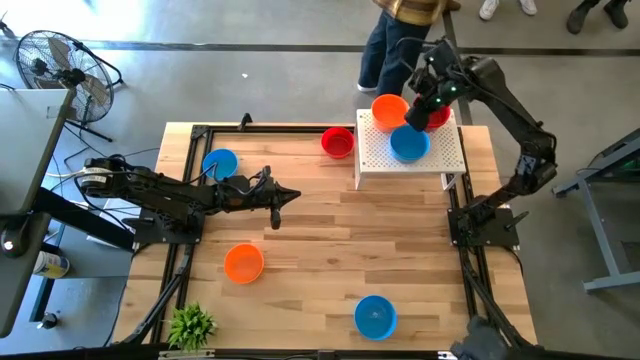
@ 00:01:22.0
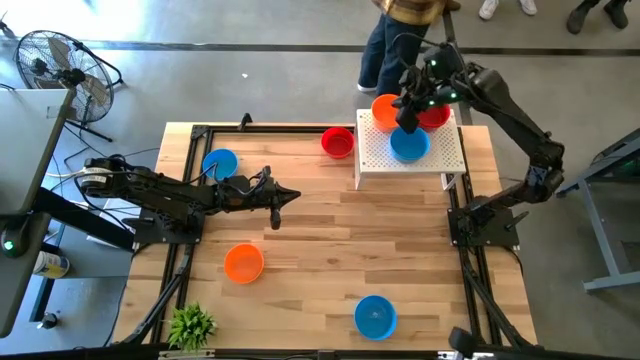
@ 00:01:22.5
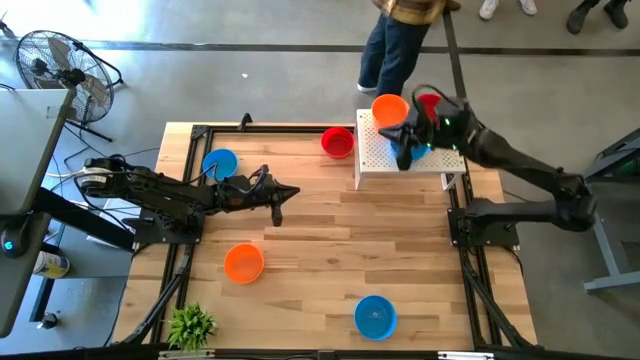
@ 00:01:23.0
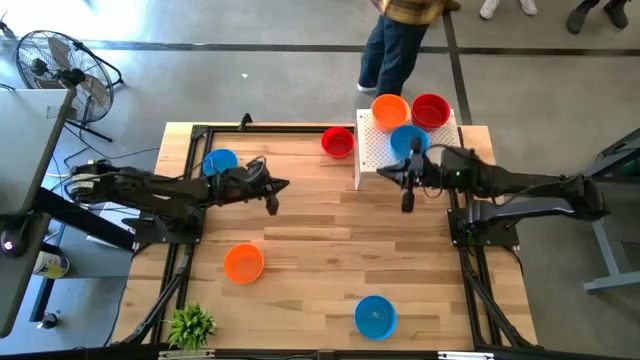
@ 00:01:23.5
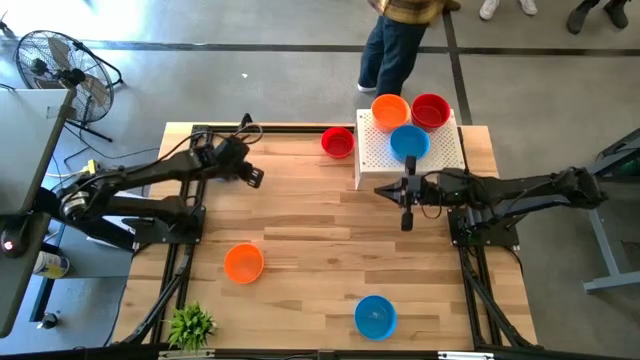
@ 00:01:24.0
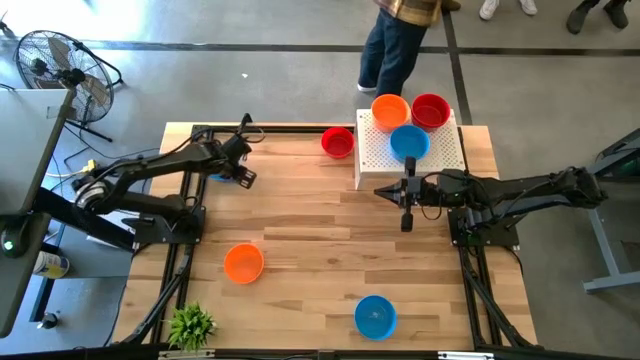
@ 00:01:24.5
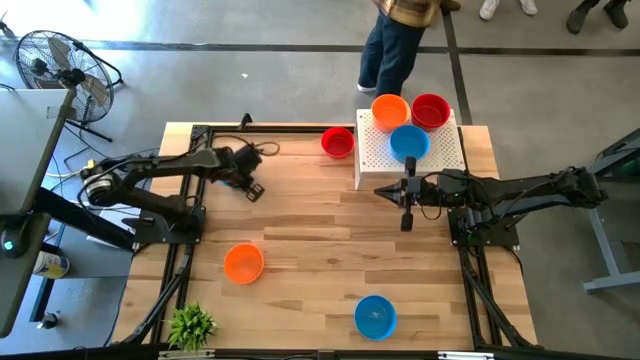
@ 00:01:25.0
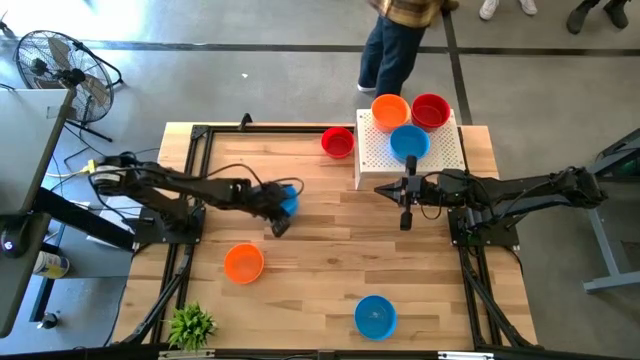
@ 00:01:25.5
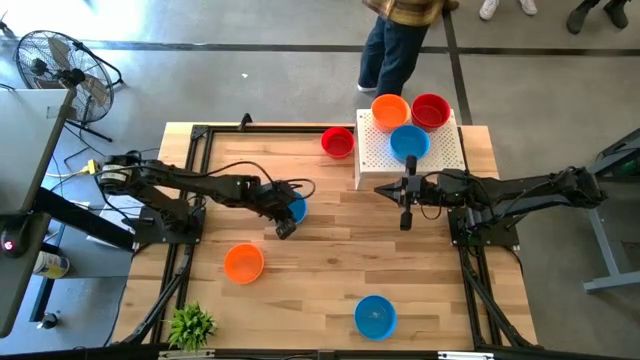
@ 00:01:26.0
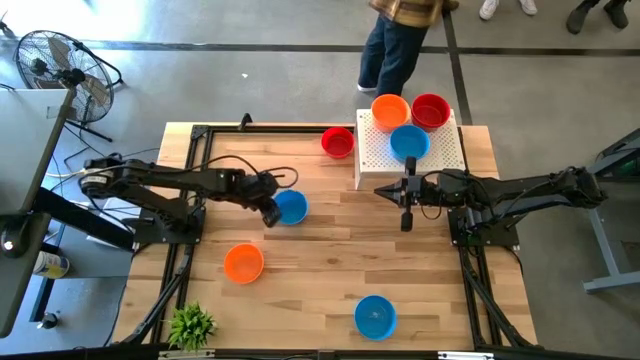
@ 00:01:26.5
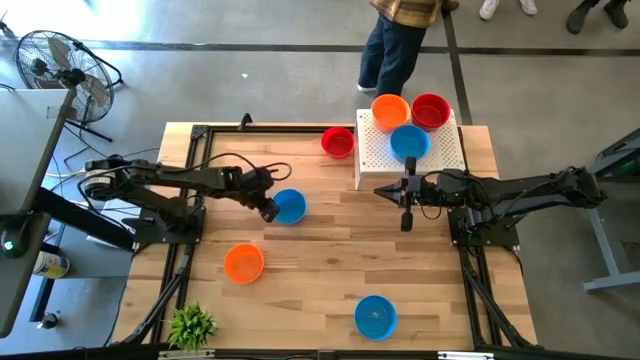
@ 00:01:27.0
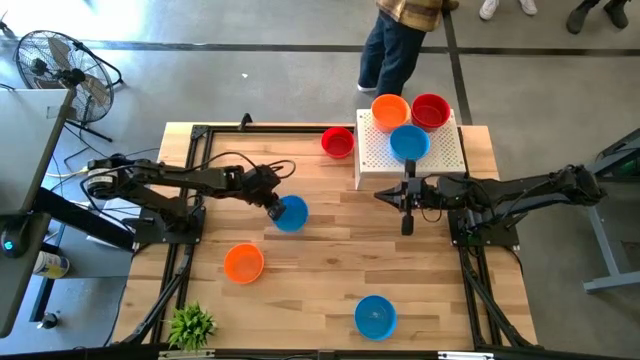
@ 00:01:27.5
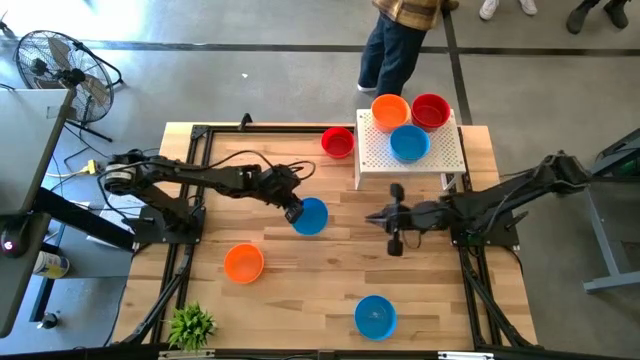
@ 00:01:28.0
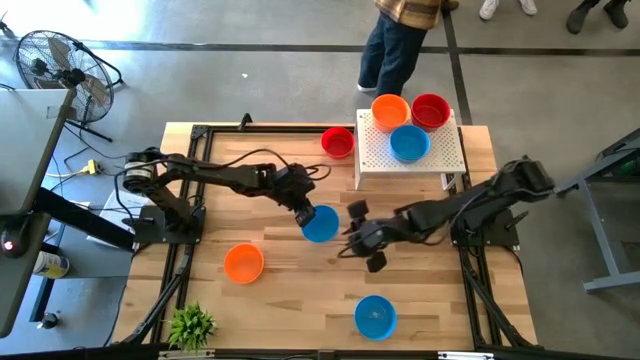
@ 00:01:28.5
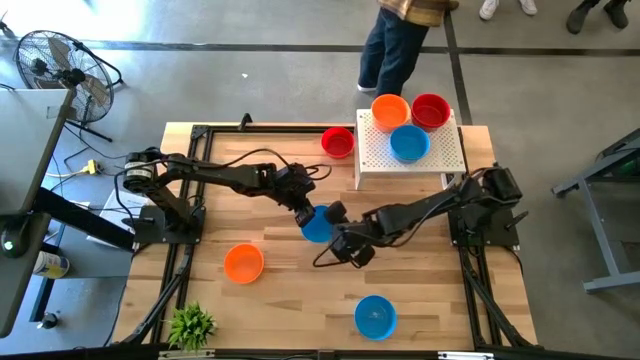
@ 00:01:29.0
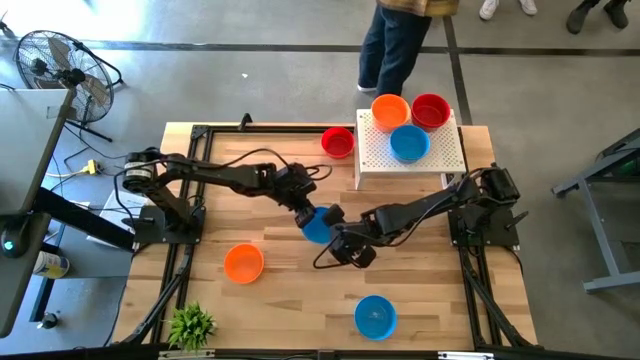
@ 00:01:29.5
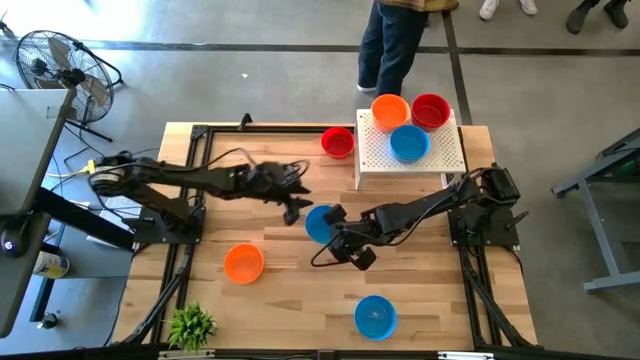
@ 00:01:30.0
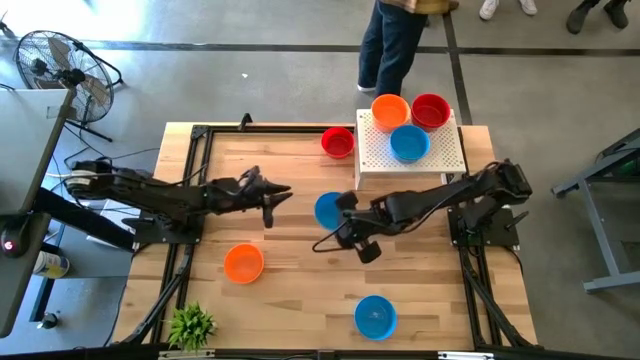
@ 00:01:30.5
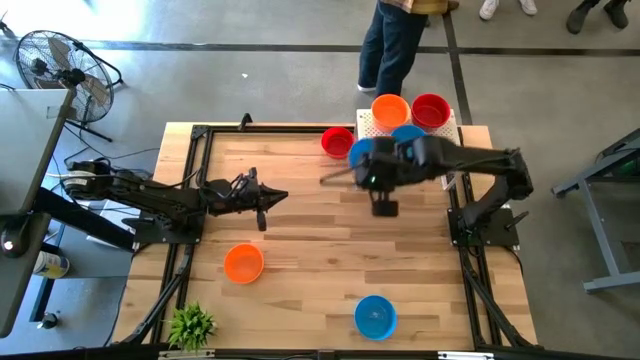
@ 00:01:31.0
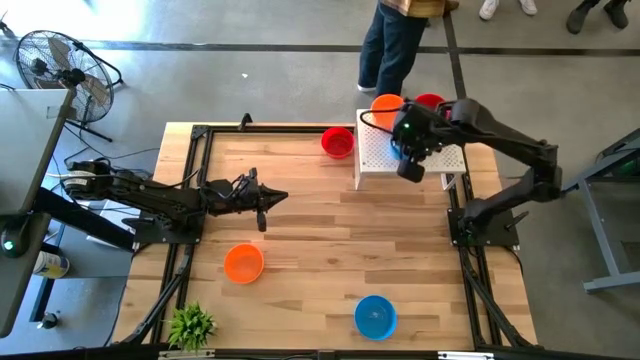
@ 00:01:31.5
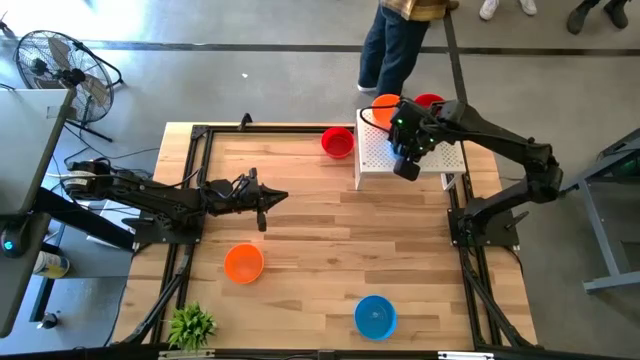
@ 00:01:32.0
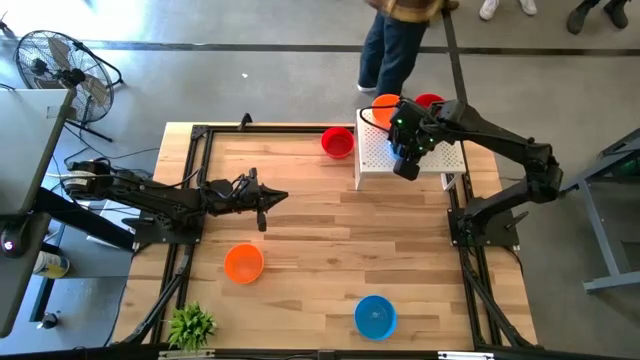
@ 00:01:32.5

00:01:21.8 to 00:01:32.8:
Task: Pick & Place Mini bowls
Stack the blue bowl on the stacked blue bowls on the shelf

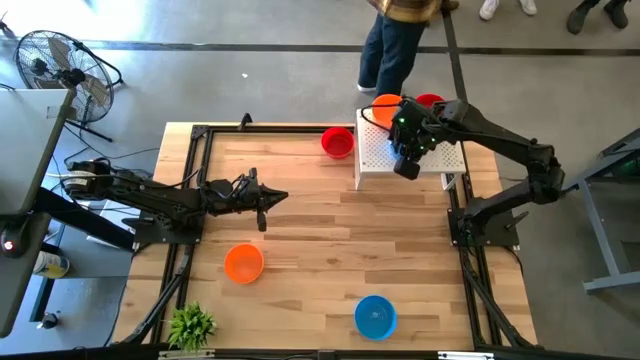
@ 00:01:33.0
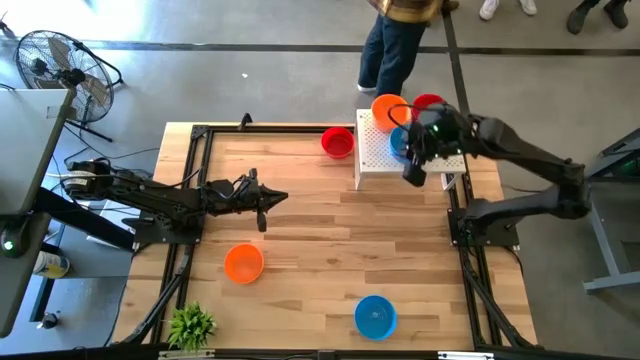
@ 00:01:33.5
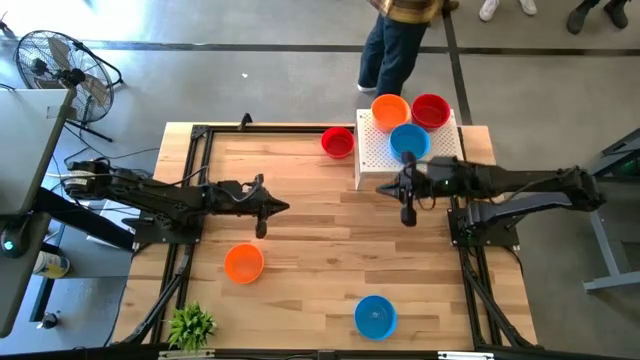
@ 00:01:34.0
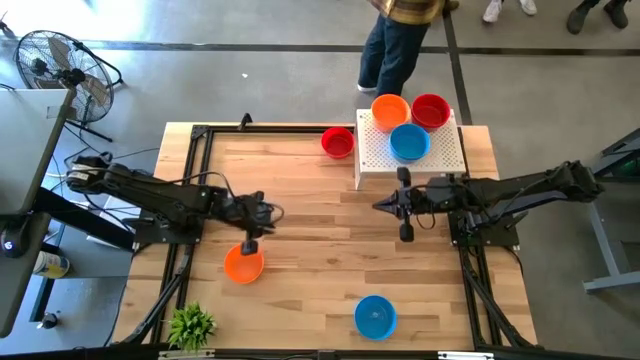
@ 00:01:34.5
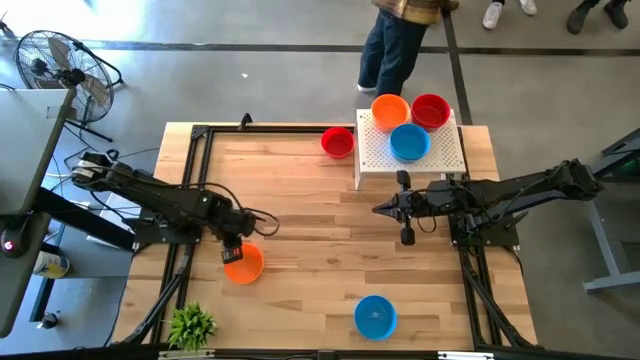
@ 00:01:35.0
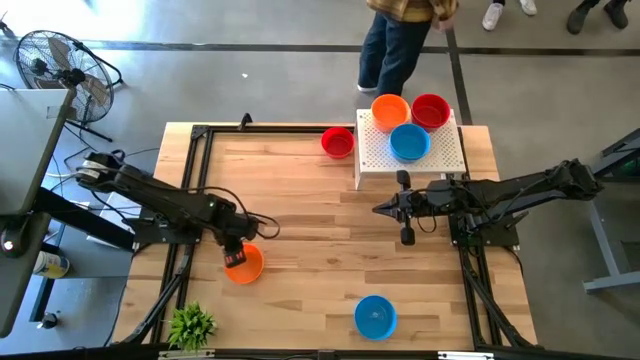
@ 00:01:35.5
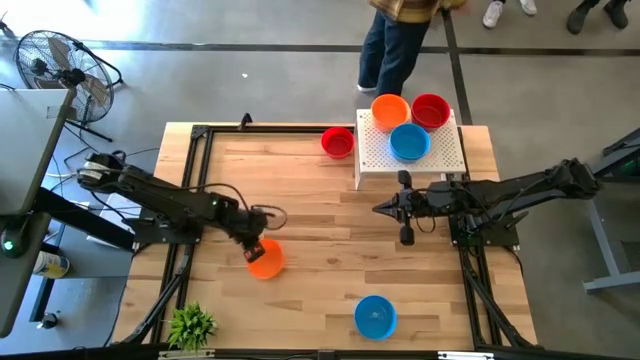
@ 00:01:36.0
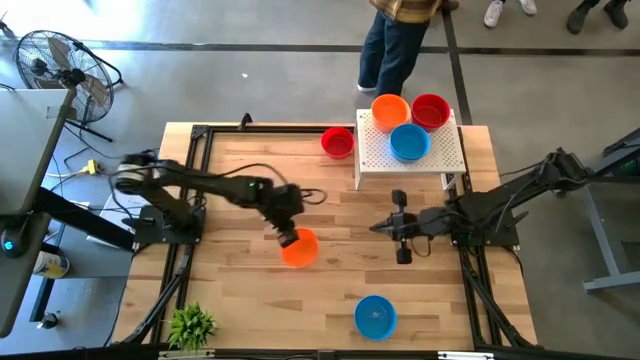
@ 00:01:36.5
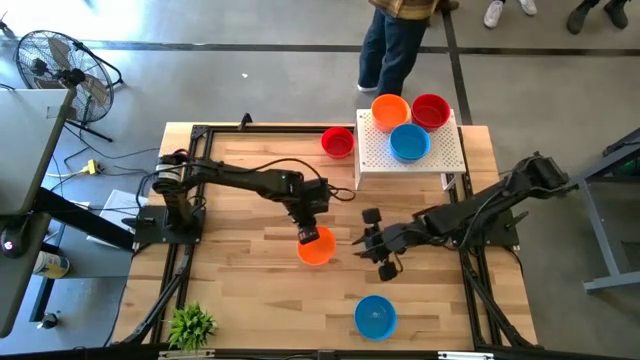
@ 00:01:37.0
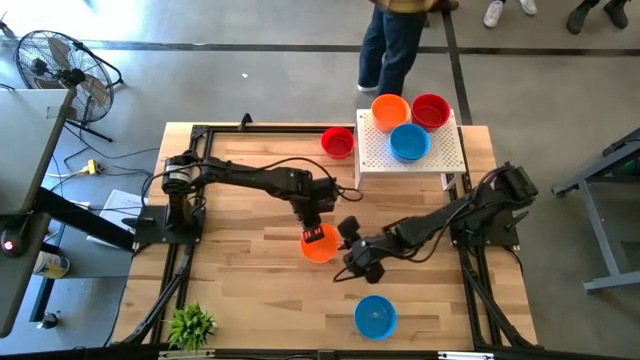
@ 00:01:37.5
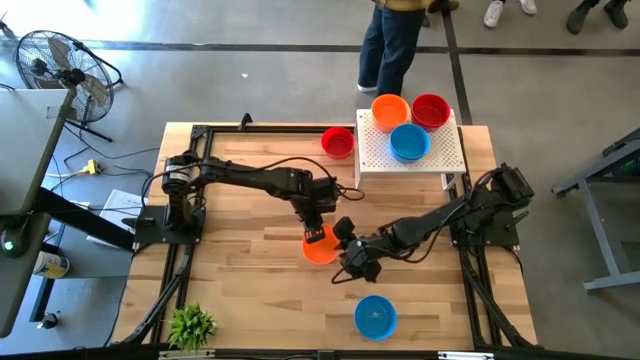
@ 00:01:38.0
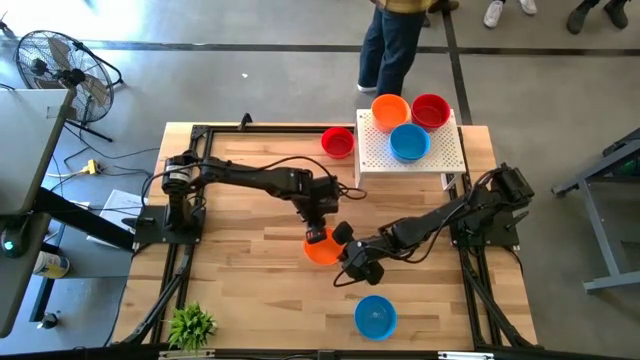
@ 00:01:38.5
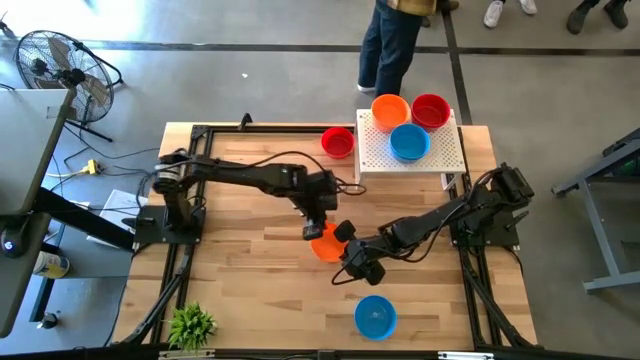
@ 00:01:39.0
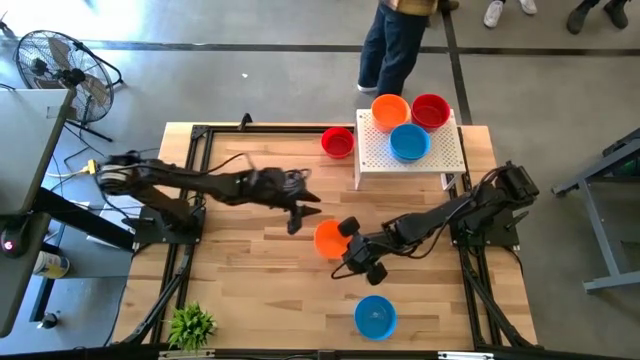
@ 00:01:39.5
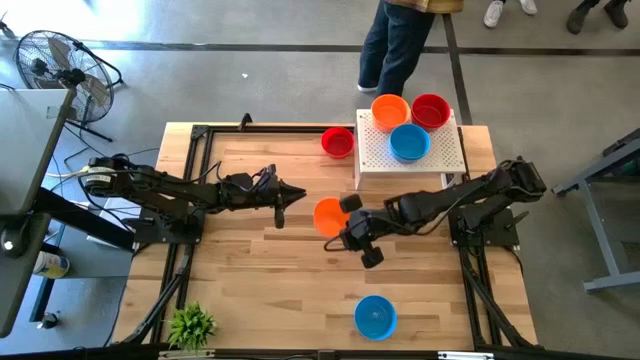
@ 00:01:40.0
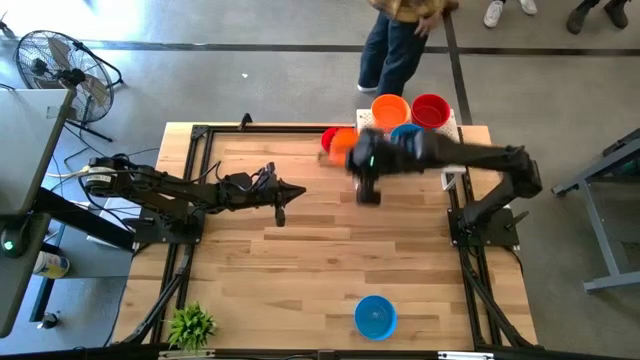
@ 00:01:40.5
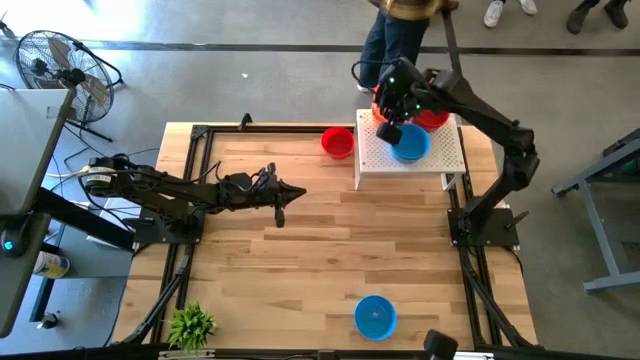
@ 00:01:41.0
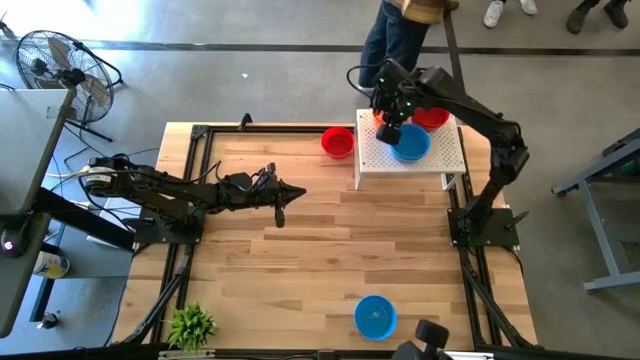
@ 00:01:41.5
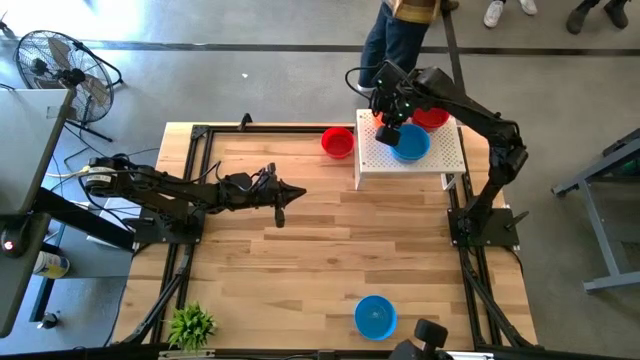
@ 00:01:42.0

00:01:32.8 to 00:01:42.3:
Stack the orange bowl on the stacked orange bowls on the shelf

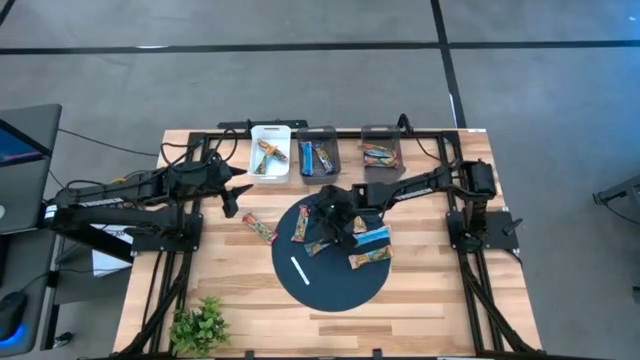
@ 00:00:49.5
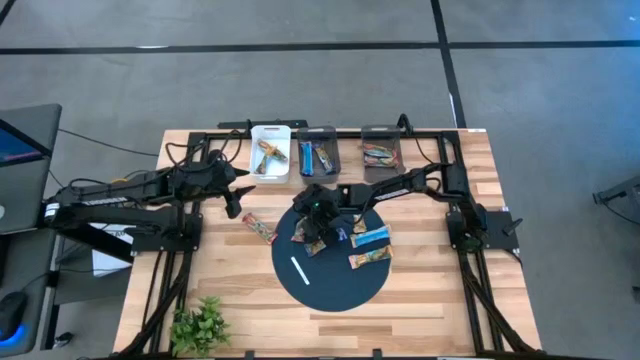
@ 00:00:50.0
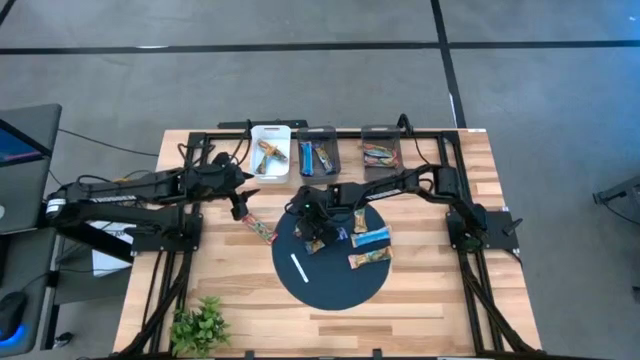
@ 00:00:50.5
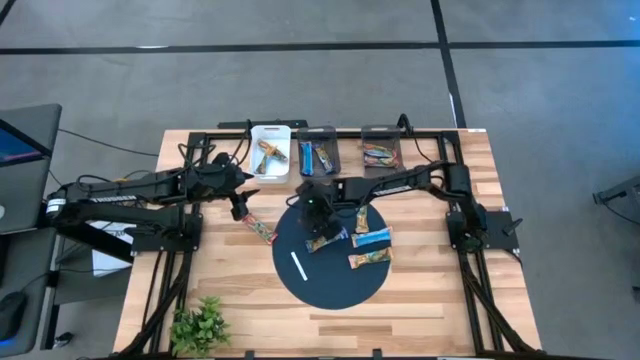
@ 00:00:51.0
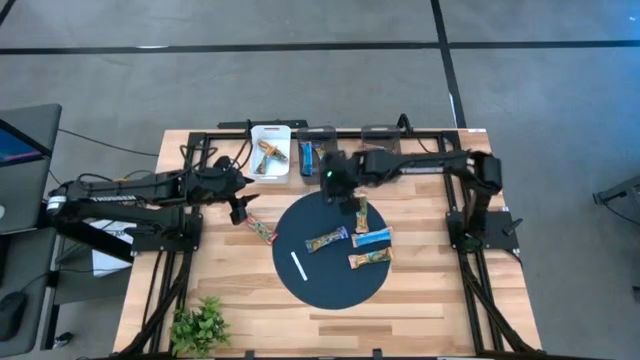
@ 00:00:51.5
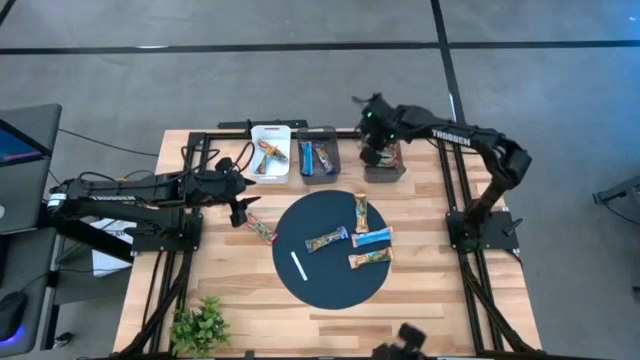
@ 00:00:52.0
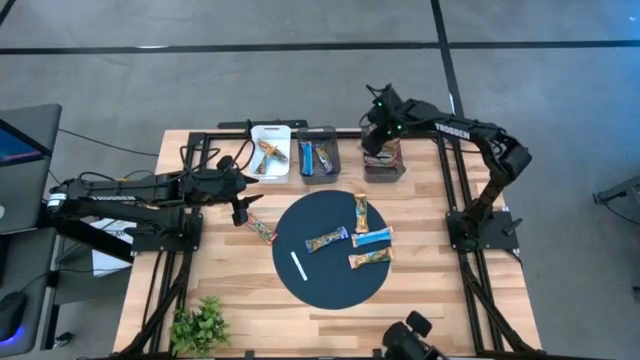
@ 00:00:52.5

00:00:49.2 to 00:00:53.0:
Task: Pick and place Granola Bars by type
Put the red granola bar into the right black bin
